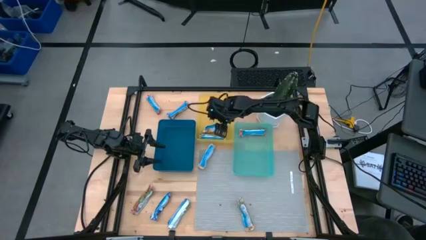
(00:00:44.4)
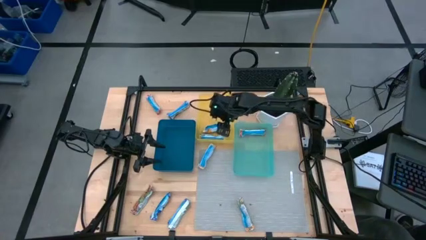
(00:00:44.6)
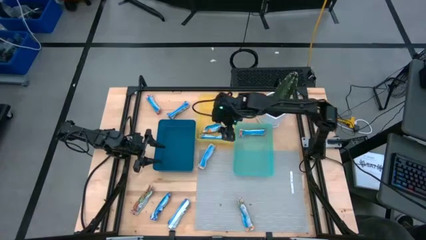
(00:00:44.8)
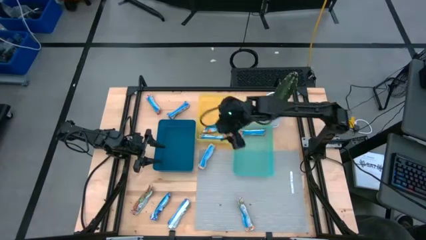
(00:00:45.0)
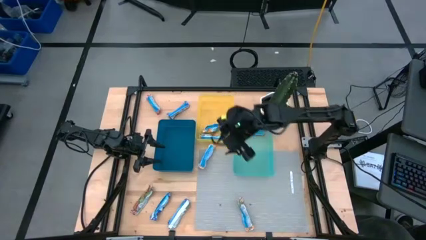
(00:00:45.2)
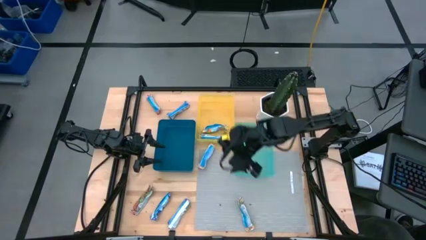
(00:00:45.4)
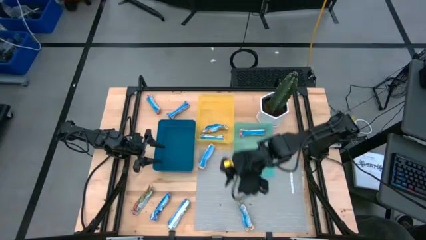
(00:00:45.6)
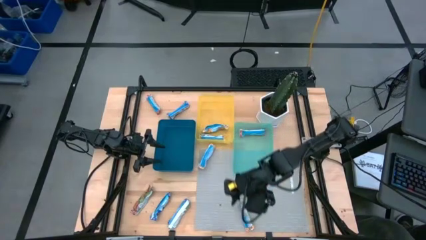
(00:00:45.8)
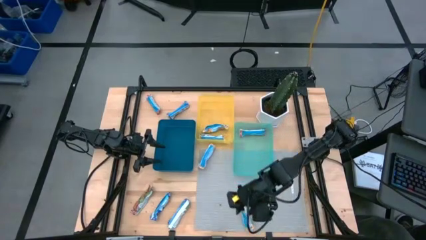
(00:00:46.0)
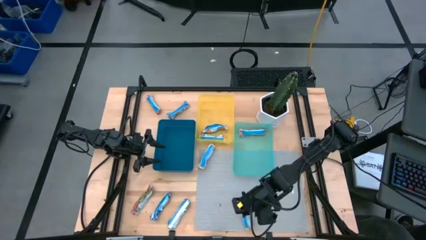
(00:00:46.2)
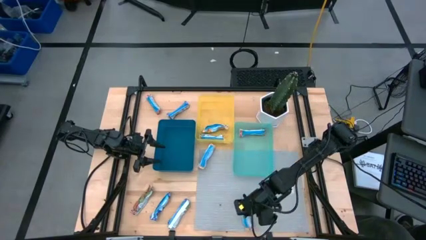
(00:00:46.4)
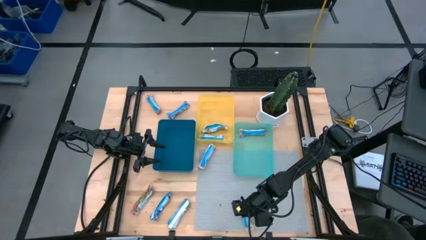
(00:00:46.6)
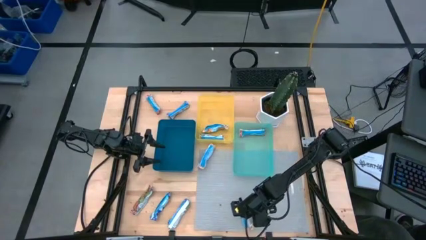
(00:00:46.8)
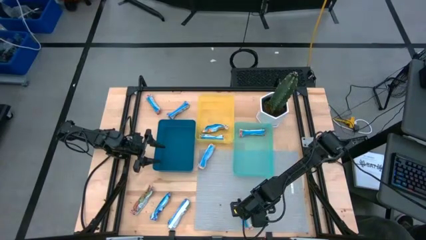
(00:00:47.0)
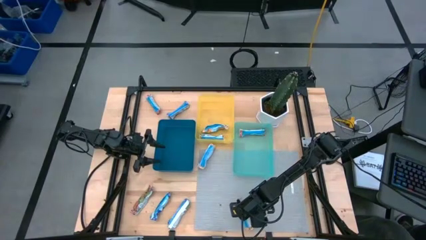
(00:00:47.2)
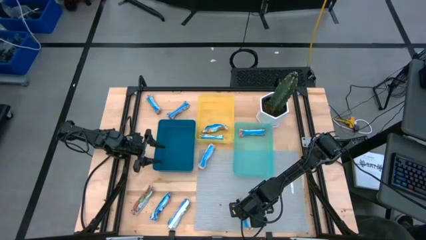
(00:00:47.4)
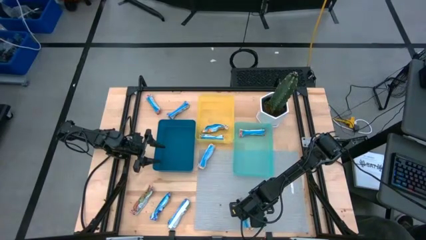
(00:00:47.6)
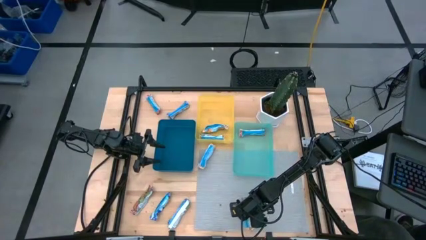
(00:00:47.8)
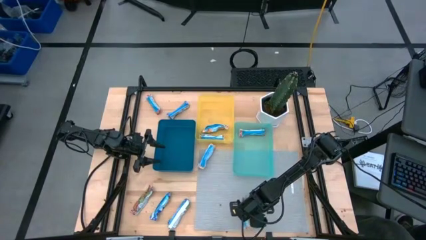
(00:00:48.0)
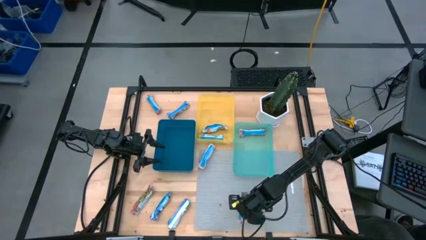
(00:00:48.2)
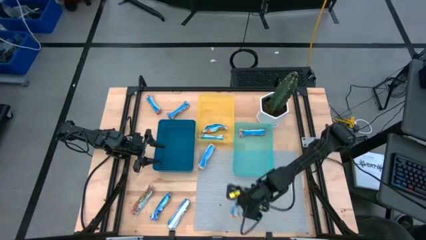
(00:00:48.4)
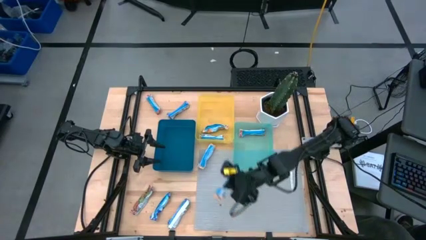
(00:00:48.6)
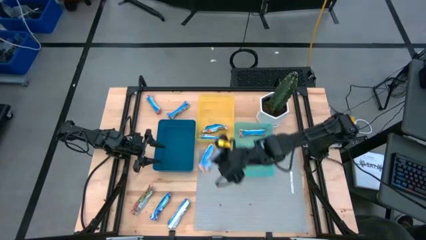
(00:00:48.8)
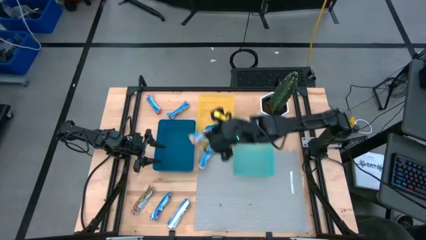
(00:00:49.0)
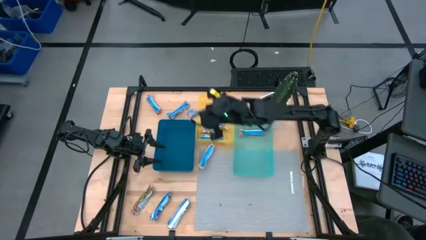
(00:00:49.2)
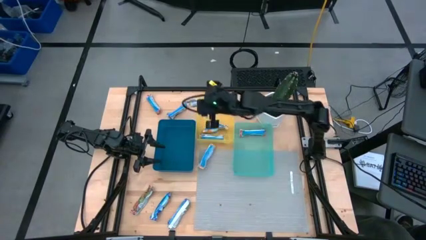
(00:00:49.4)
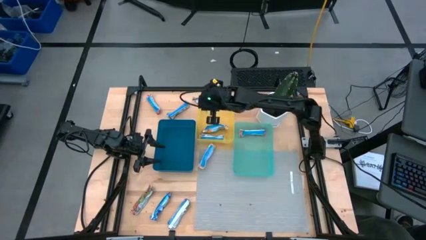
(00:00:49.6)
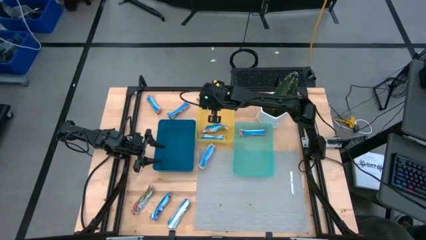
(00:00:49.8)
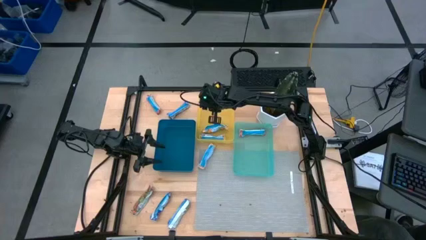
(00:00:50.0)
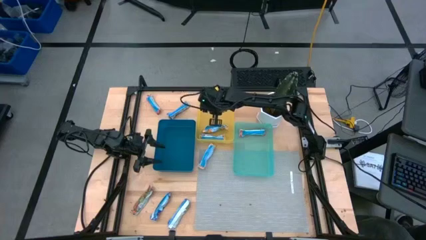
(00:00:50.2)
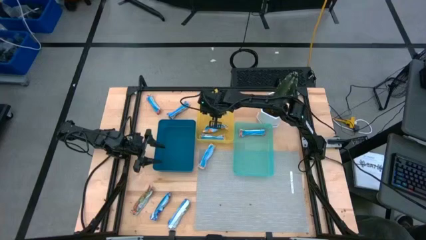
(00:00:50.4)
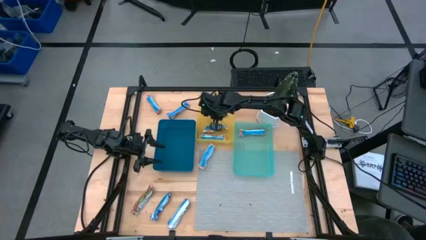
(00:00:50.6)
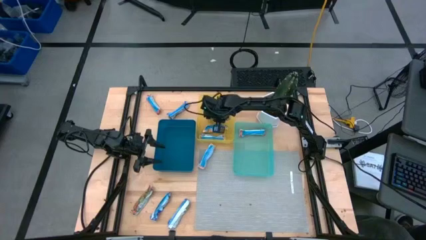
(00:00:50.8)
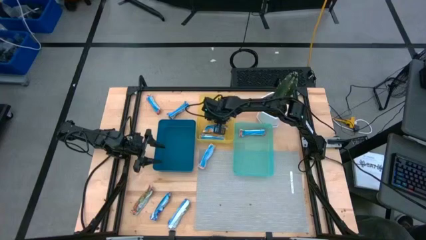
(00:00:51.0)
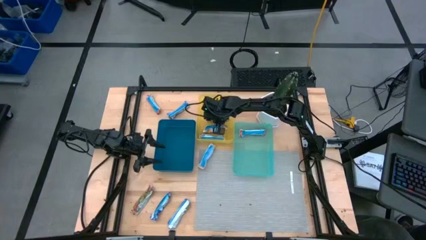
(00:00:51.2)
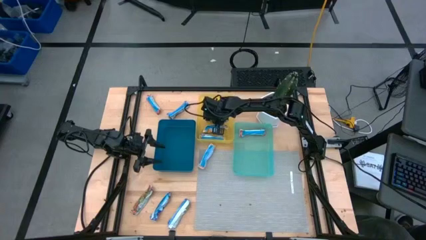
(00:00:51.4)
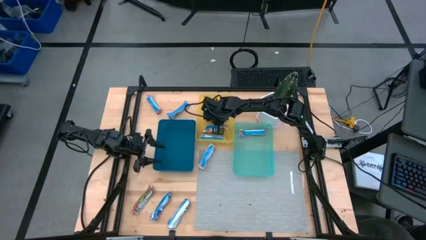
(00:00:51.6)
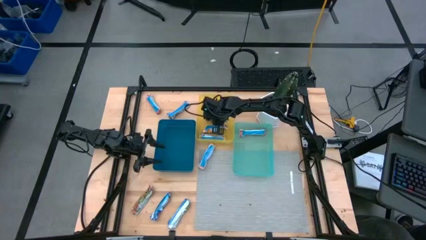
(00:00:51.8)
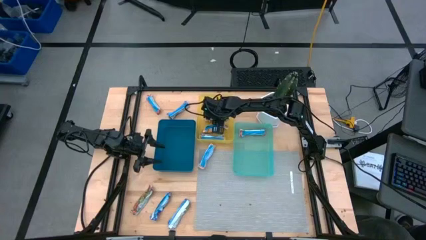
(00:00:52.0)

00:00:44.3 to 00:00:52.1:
Task: Pick and place Granola Bars by type
Put the yellow granola bar into the yellow bin

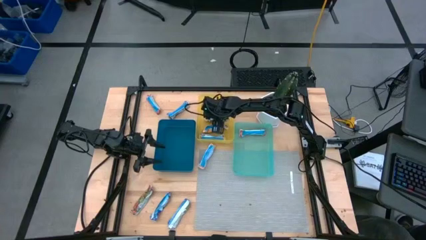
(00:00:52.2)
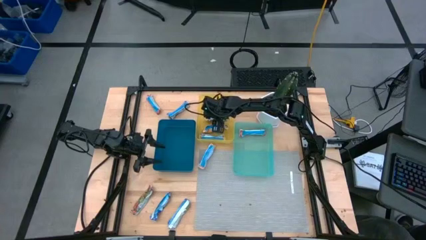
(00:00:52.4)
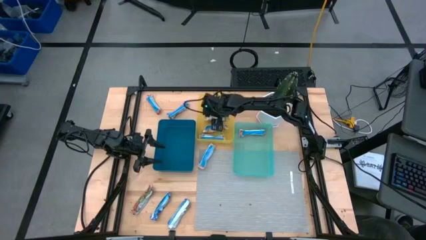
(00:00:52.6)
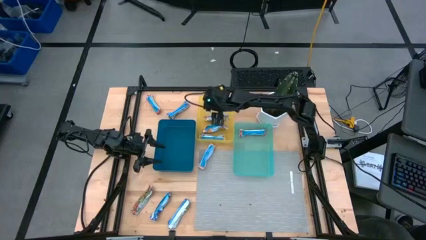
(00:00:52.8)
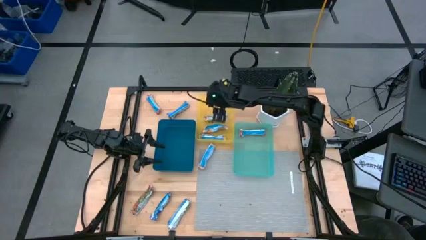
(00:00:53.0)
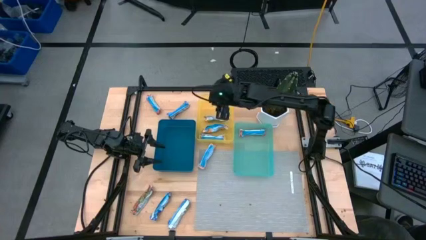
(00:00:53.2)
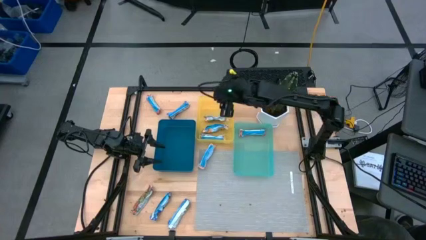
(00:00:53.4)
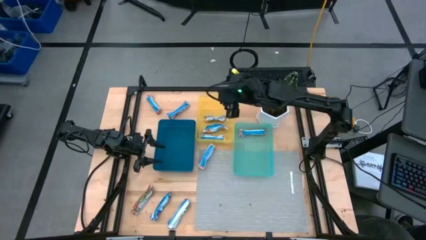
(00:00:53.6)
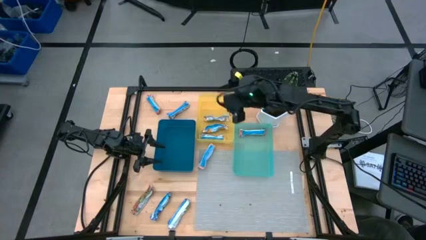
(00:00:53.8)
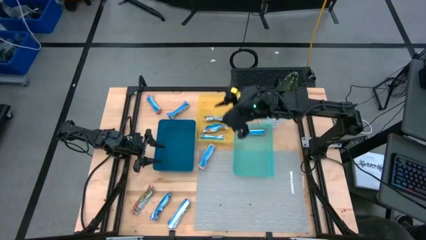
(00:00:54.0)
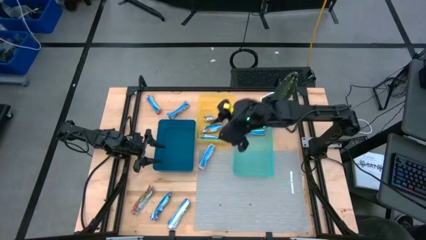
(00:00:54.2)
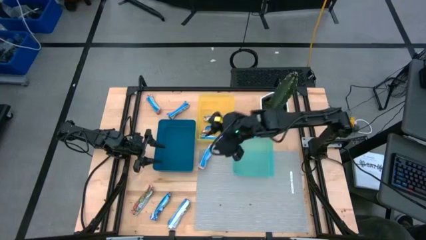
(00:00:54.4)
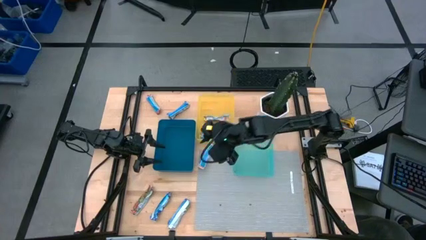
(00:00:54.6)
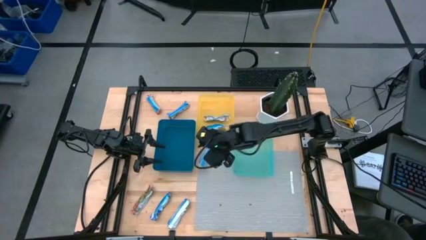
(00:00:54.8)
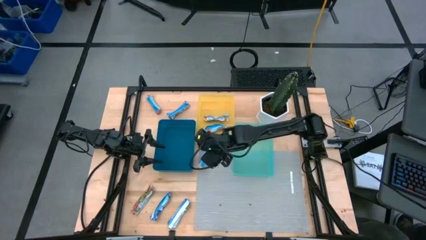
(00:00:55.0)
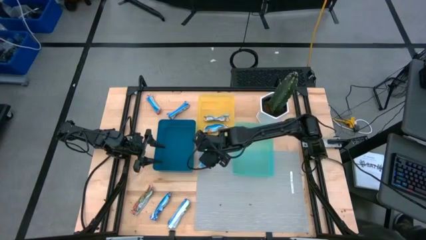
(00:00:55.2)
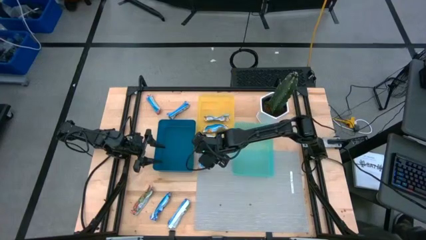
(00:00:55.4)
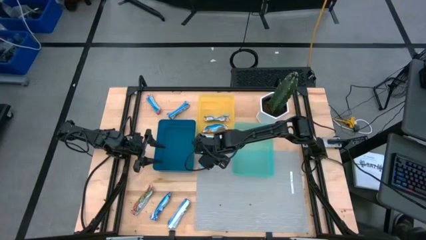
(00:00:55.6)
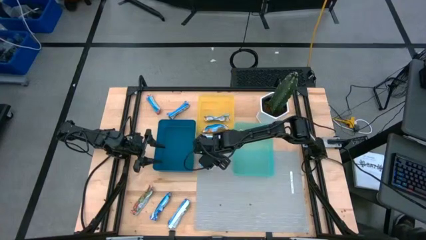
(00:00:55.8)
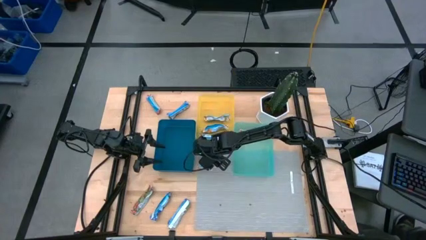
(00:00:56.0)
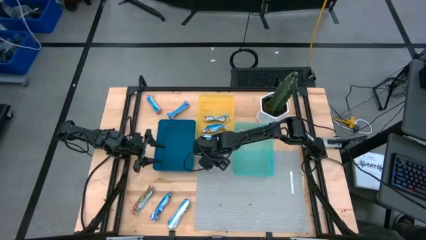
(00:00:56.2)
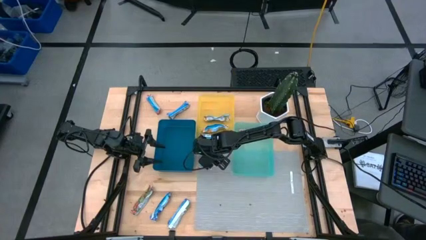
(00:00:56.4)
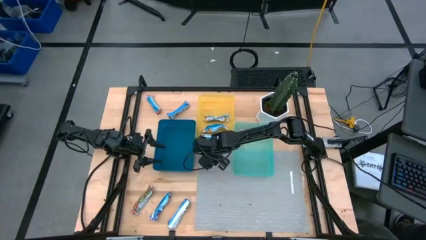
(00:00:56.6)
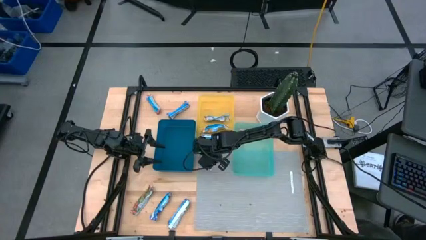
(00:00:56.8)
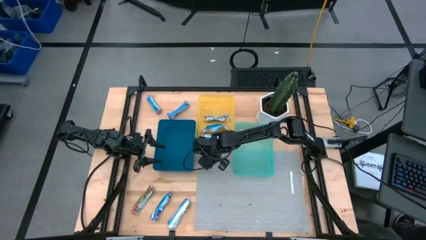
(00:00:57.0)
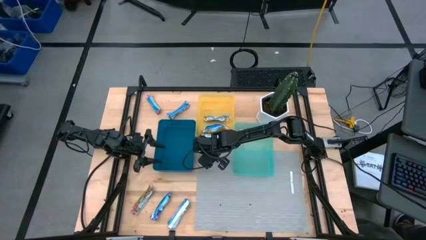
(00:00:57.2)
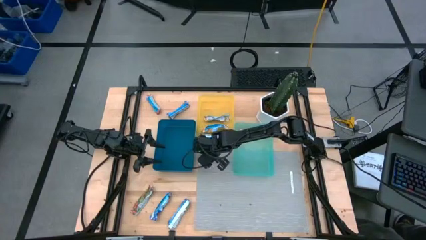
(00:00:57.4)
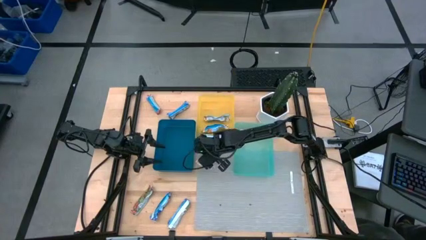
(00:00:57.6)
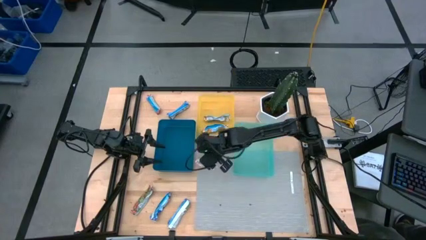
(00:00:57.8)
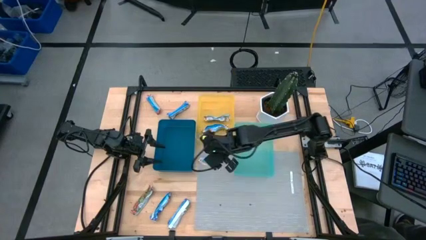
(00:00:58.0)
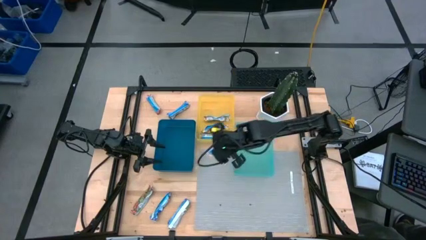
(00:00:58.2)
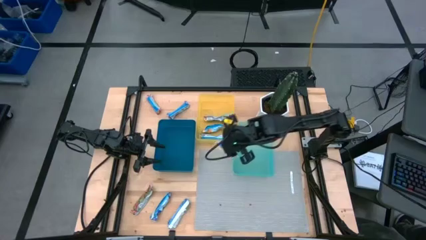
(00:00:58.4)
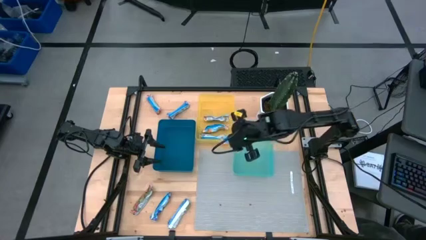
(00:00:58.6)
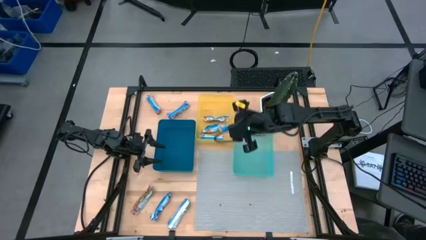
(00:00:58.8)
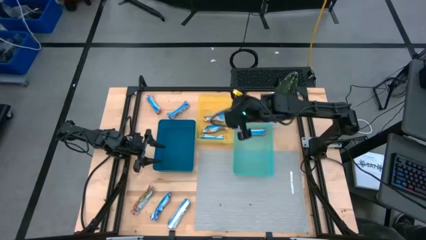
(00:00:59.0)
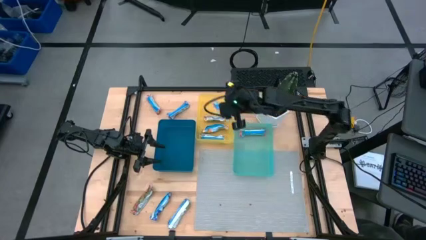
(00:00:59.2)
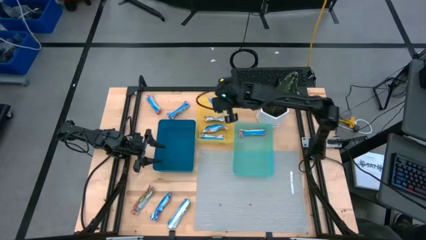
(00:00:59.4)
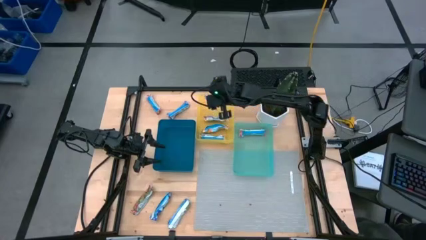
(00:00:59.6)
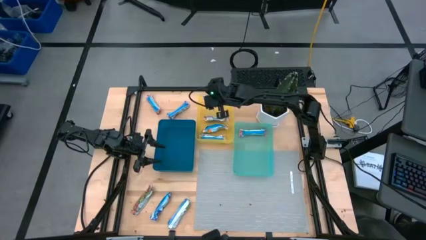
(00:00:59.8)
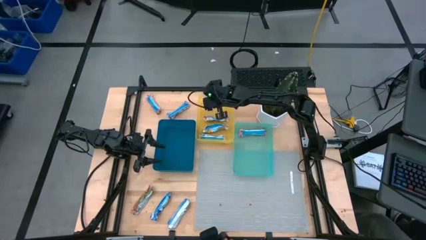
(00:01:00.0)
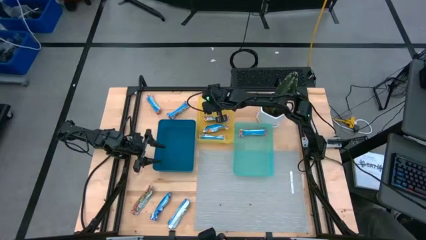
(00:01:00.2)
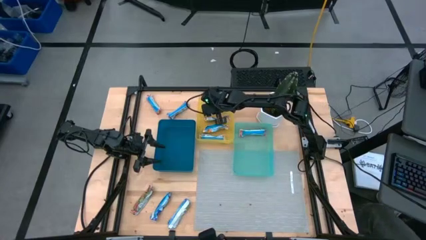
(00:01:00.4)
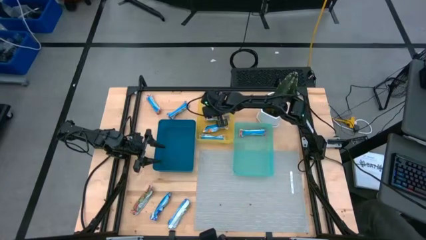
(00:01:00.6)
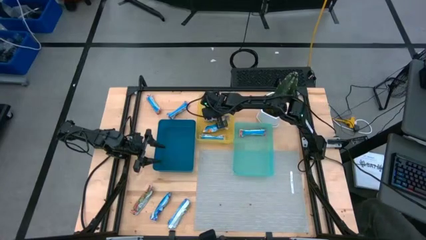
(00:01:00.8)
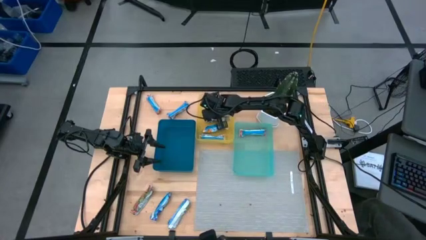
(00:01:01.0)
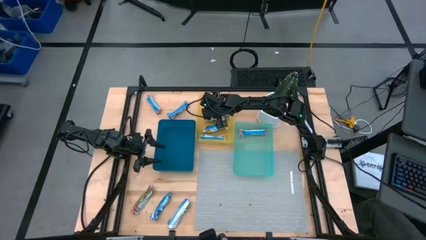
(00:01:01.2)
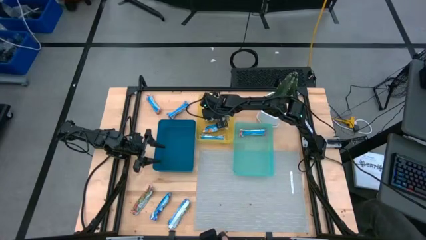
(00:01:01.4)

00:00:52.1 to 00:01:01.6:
Put the yellow granola bar into the yellow bin
